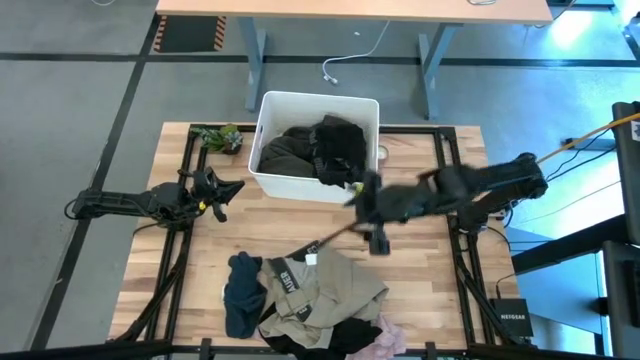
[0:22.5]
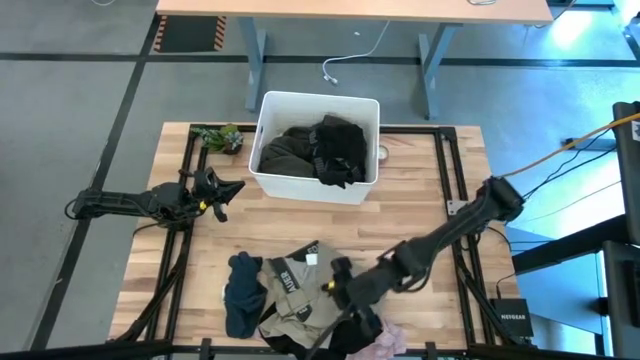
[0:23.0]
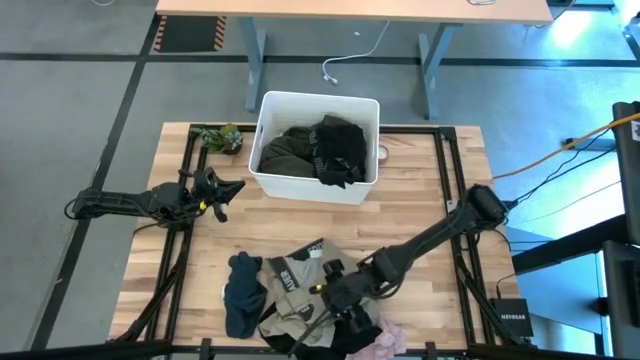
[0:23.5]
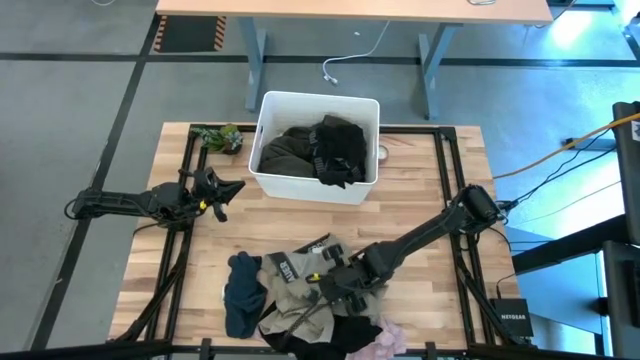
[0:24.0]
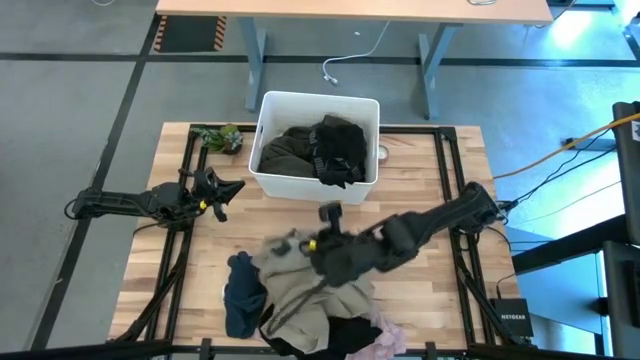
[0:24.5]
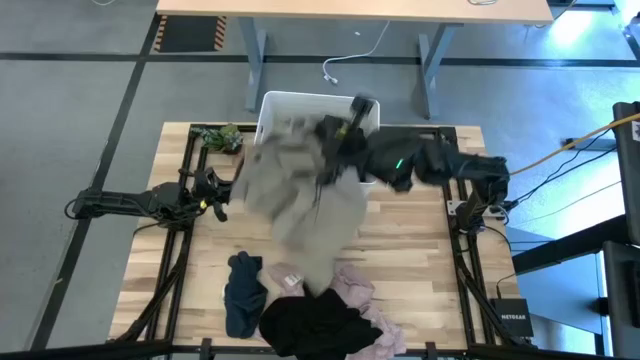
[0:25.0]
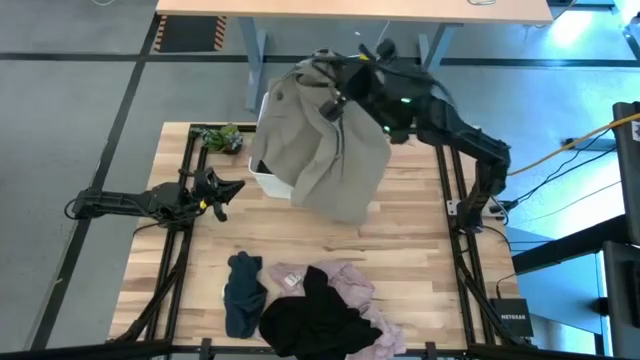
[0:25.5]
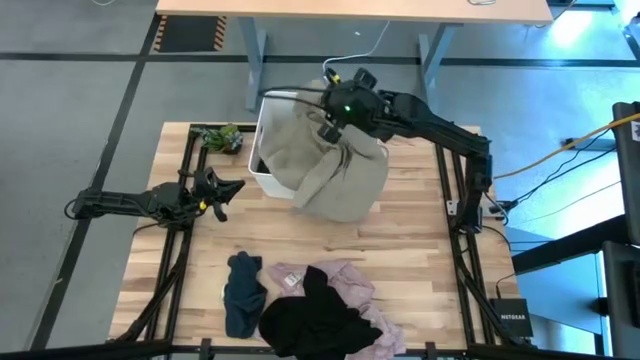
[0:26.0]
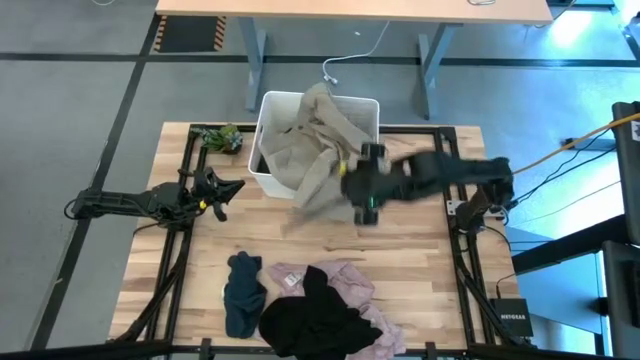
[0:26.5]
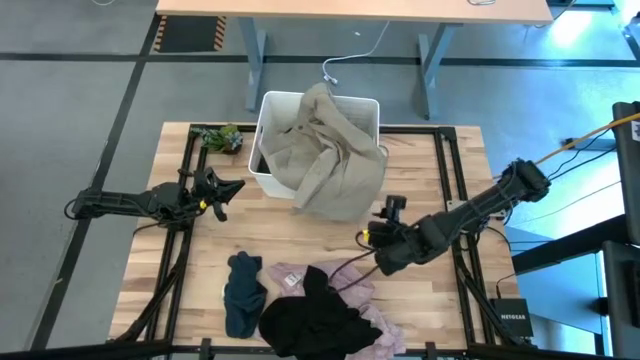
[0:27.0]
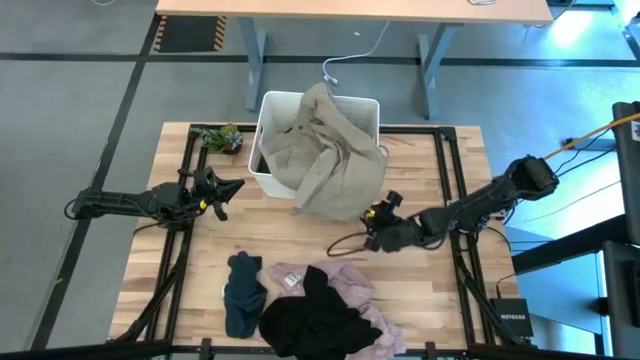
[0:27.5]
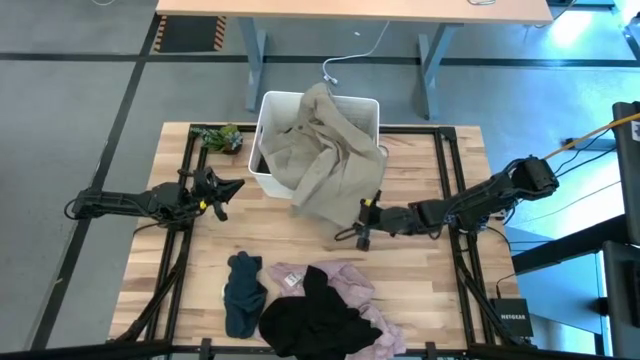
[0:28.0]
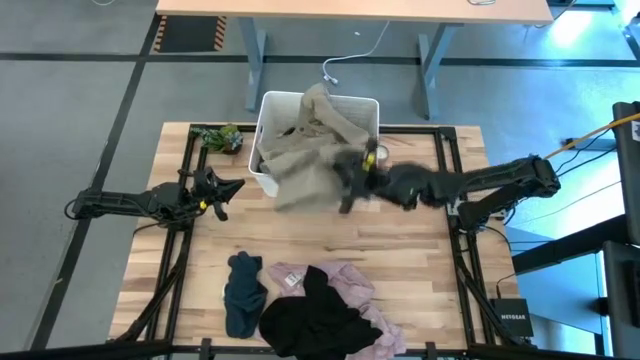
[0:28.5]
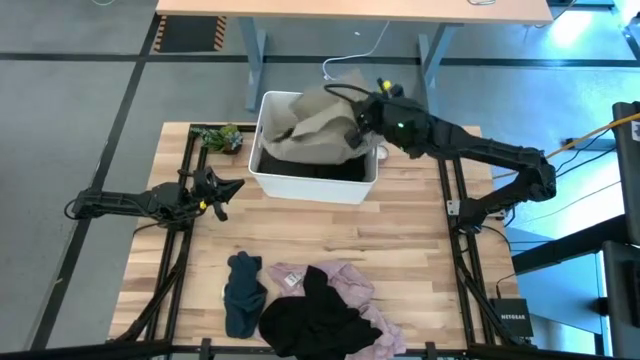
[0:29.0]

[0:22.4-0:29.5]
Task: Sort clothes
Put the brown shorts into the white bin

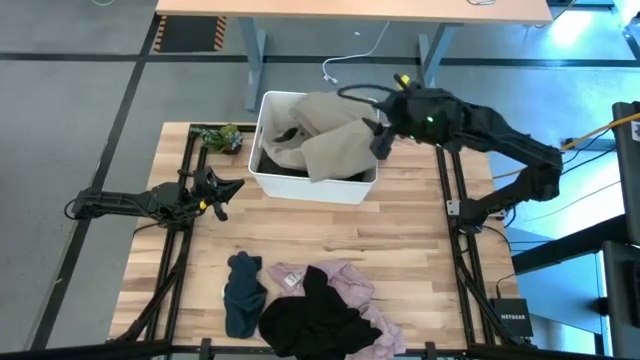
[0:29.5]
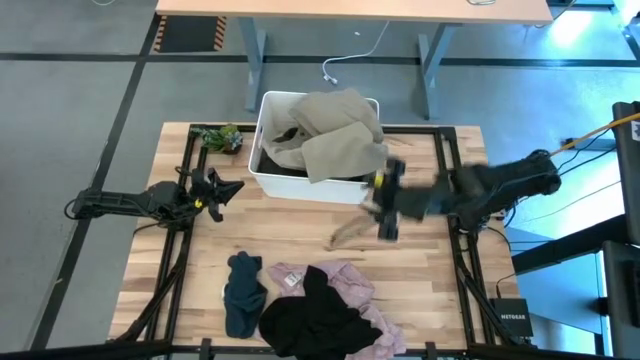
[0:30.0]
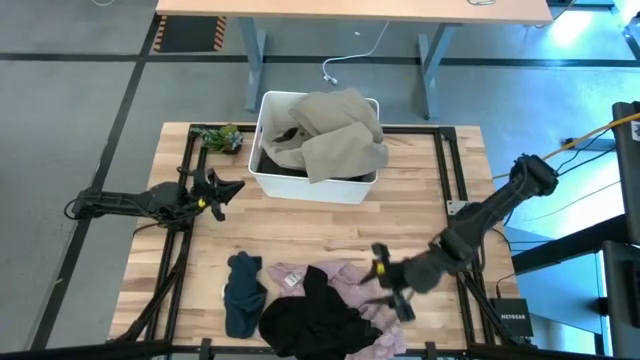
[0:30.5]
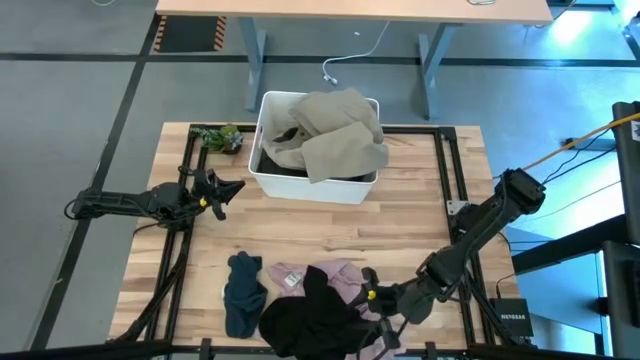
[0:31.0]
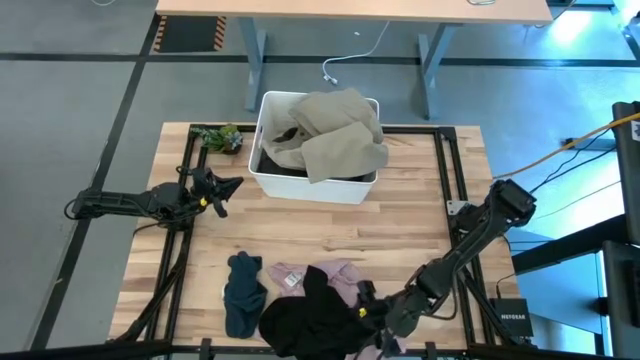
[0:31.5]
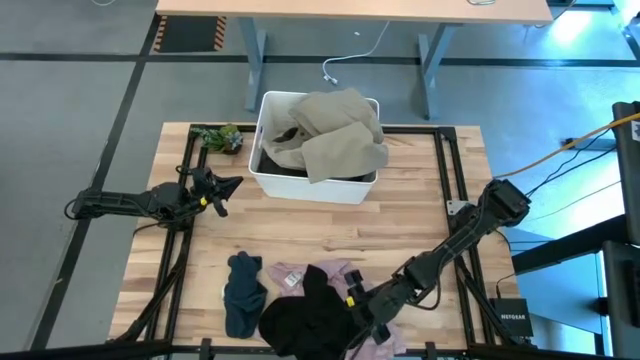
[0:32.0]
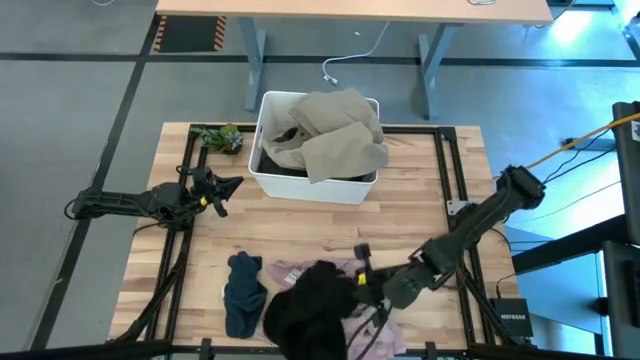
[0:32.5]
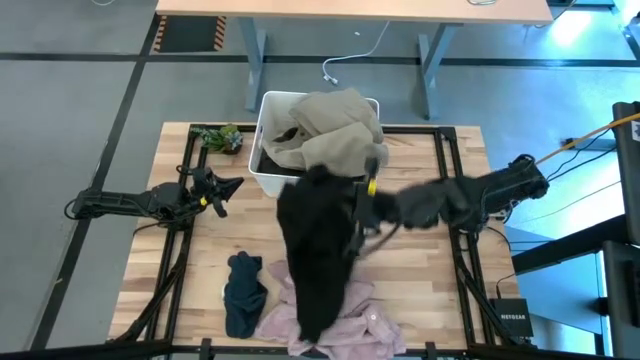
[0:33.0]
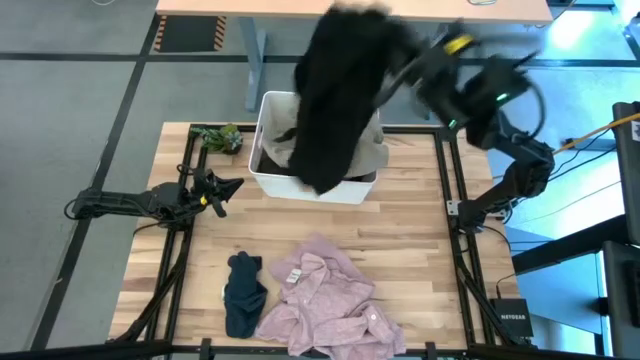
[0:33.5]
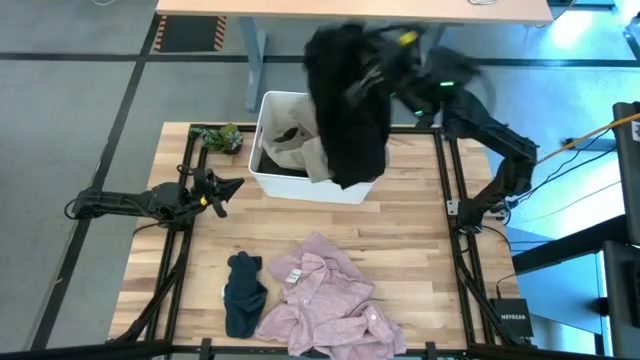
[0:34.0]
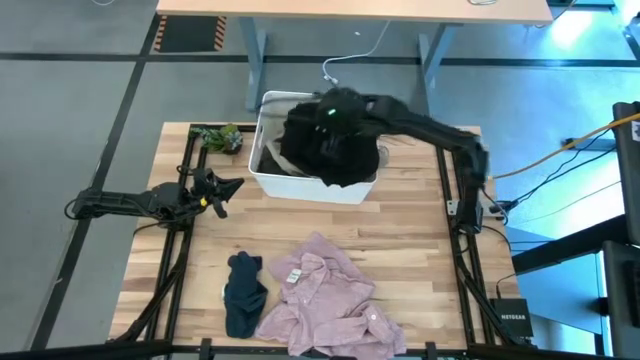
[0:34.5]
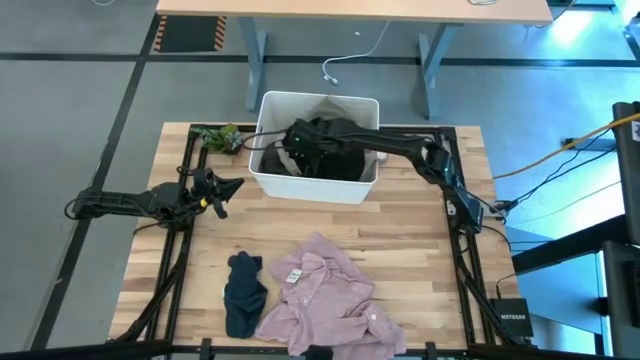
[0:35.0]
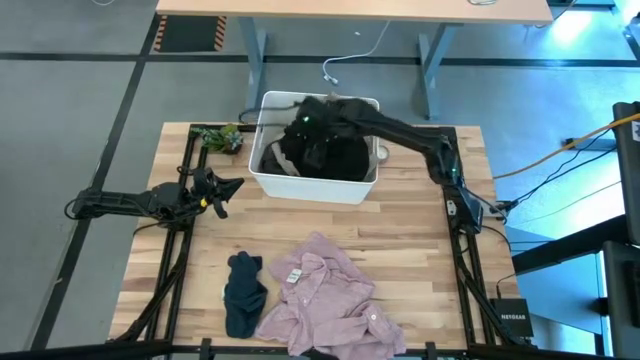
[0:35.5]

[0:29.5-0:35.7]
Put the black shirt into the white bin

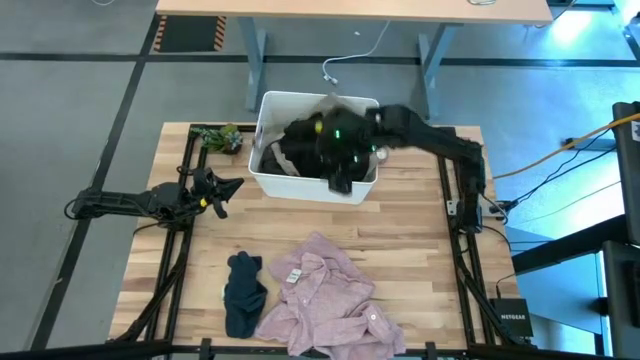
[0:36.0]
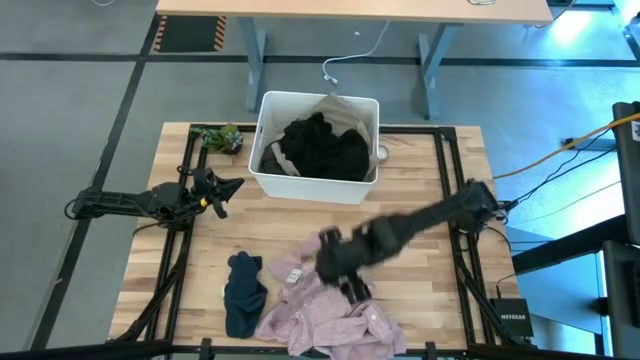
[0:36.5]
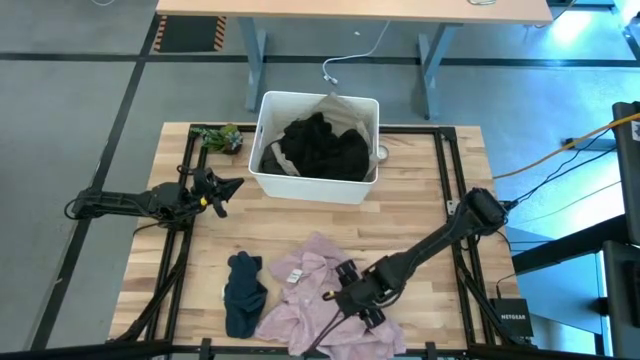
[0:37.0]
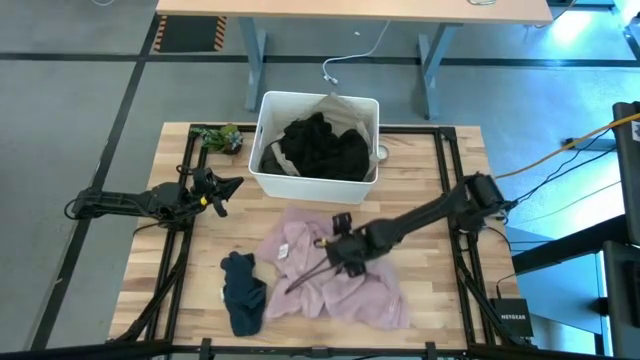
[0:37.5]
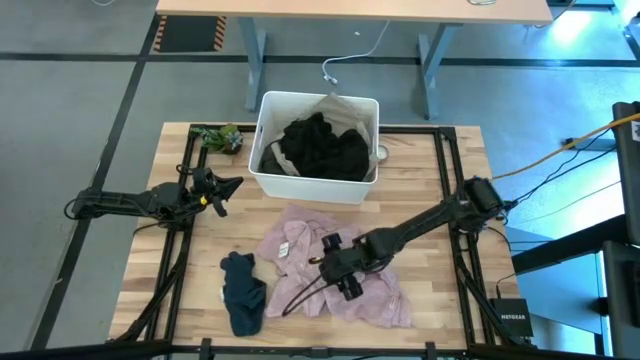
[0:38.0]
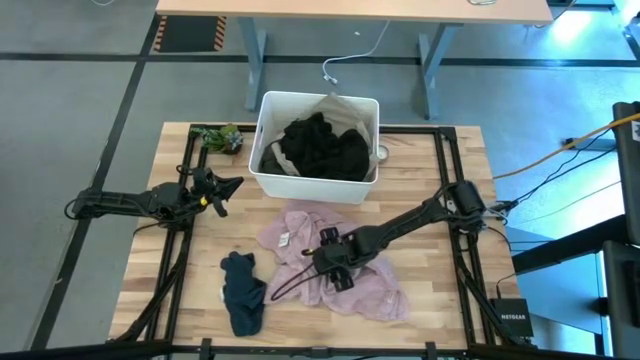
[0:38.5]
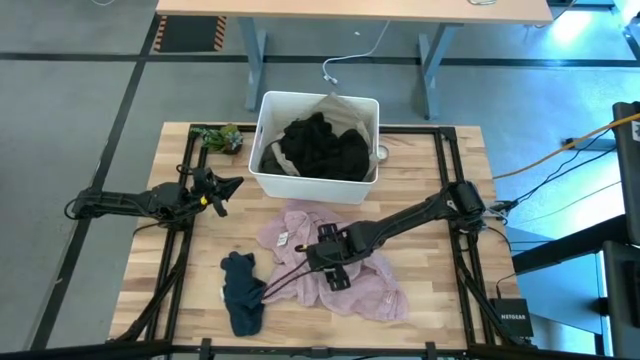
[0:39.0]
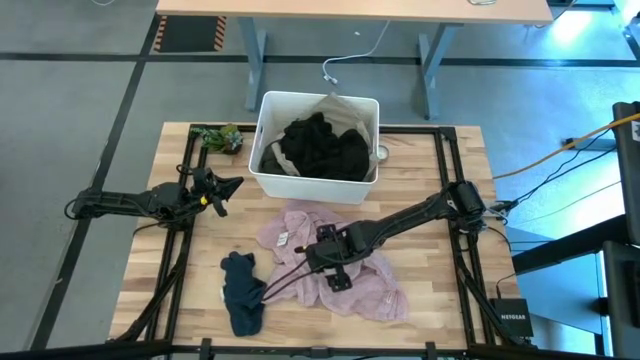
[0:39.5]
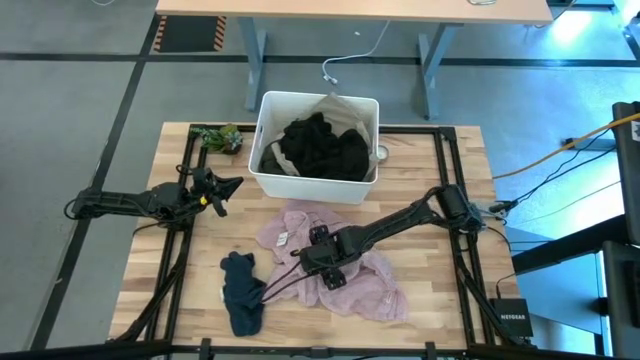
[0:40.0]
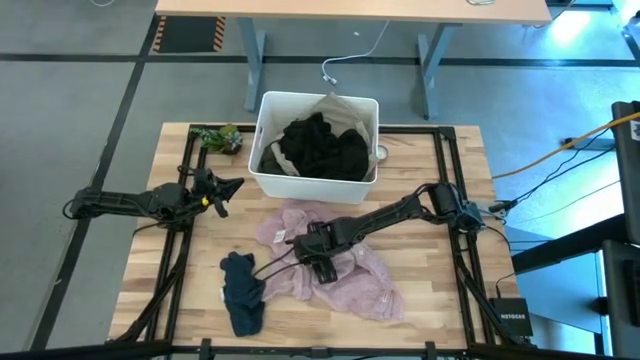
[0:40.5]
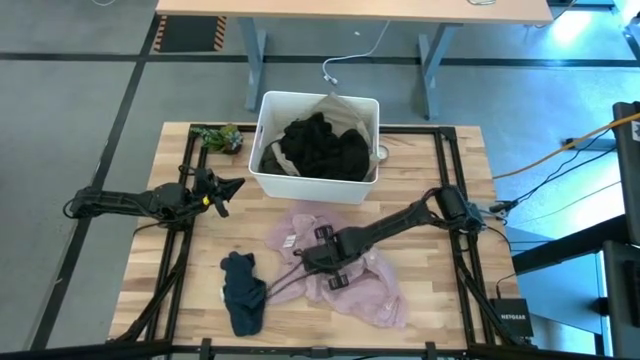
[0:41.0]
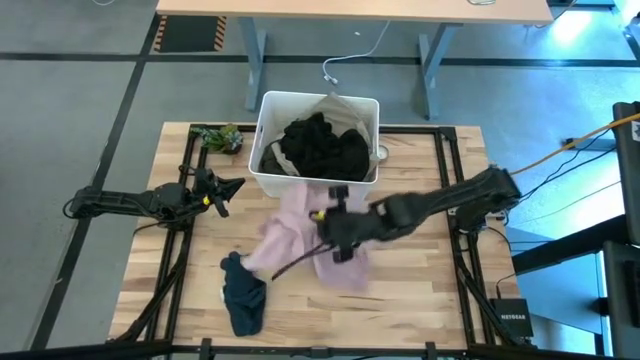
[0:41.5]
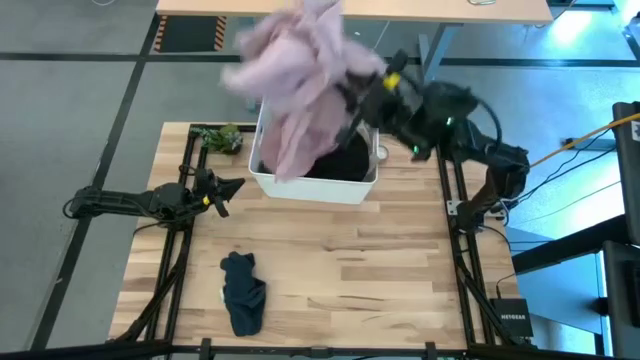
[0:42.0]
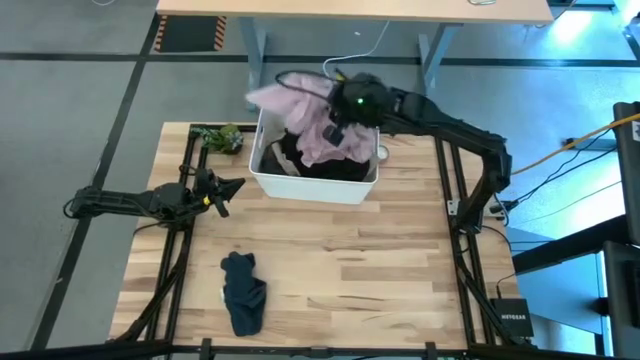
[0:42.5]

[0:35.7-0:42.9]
Put the pink shirt into the white bin

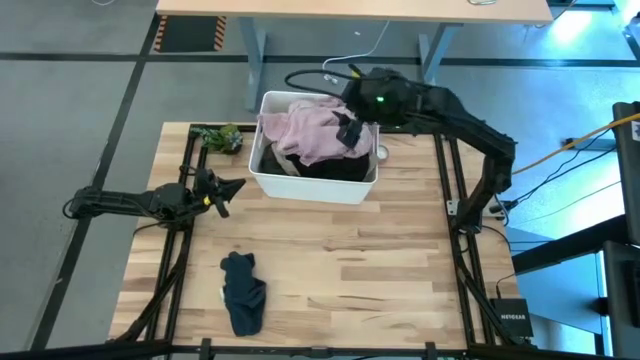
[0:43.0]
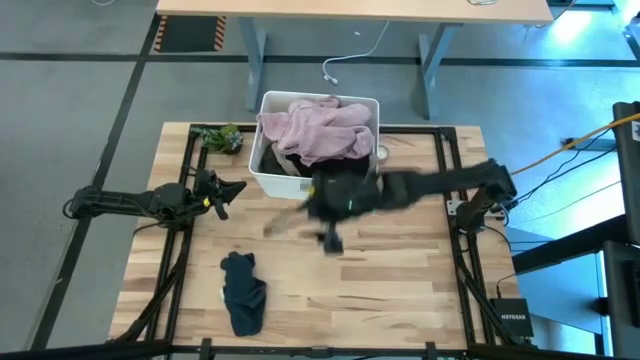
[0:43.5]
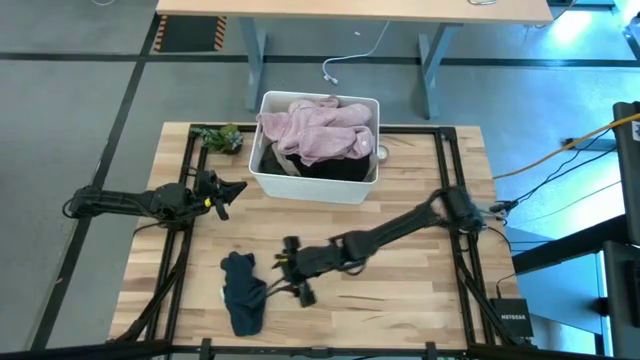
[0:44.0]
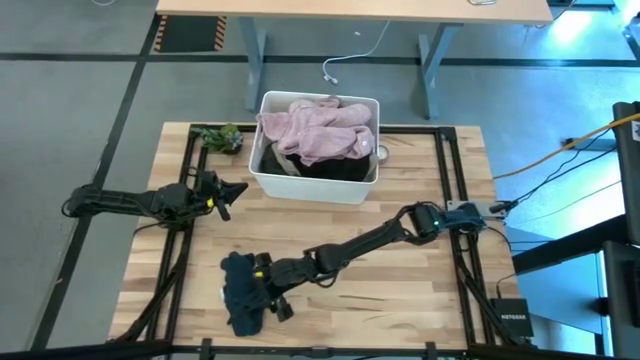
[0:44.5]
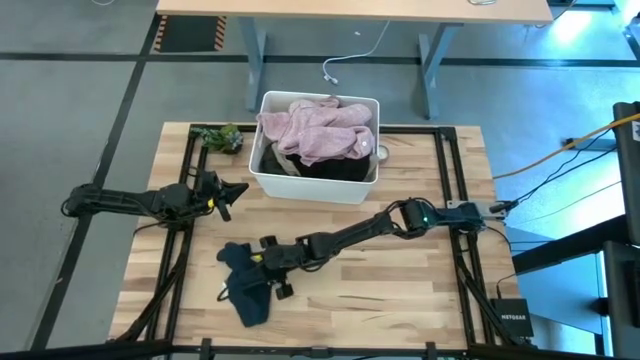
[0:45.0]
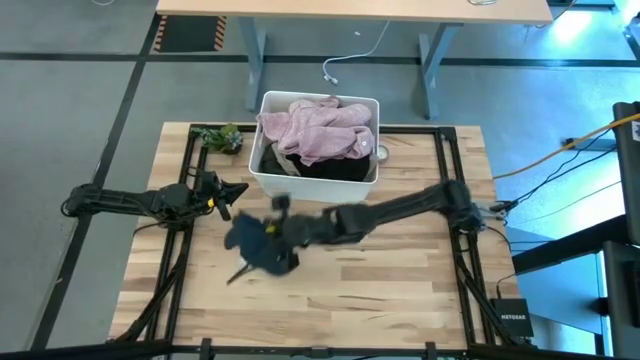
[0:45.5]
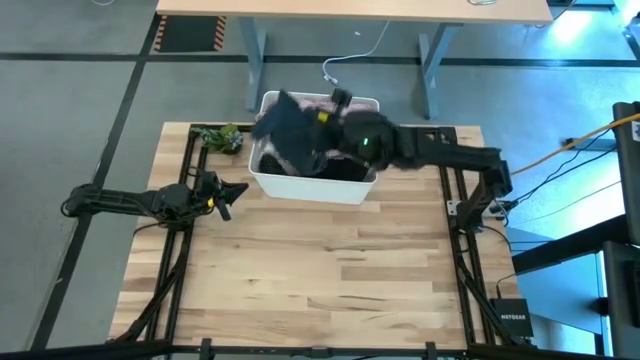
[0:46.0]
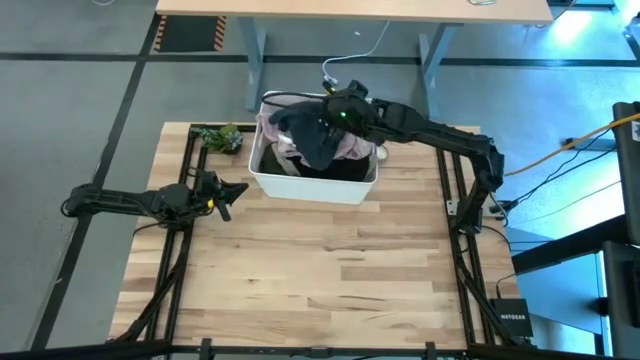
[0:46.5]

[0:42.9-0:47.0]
Put the dark blue underwear into the white bin
